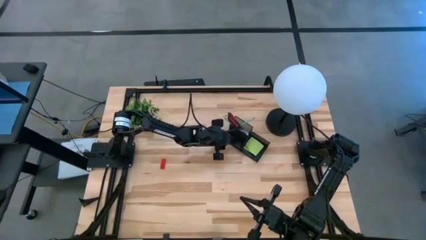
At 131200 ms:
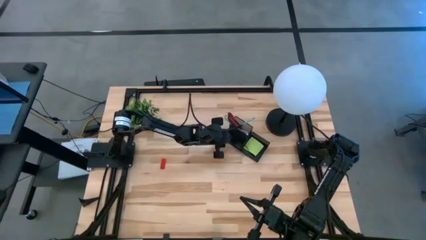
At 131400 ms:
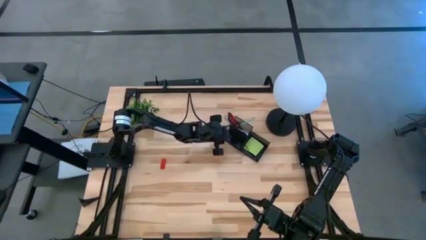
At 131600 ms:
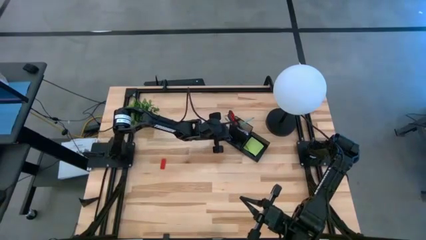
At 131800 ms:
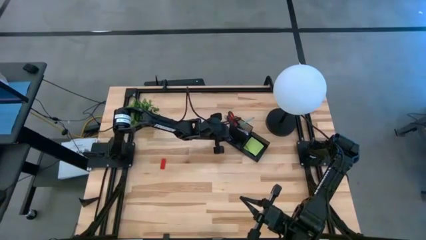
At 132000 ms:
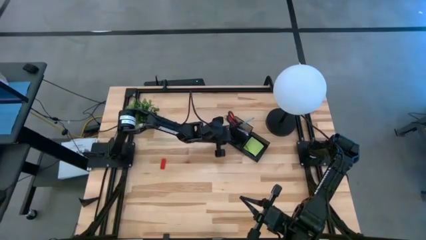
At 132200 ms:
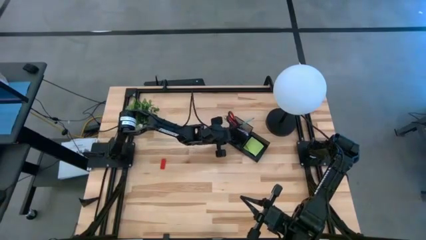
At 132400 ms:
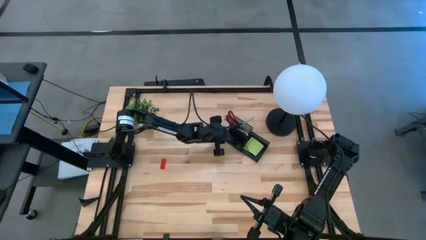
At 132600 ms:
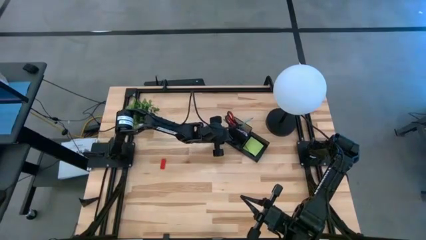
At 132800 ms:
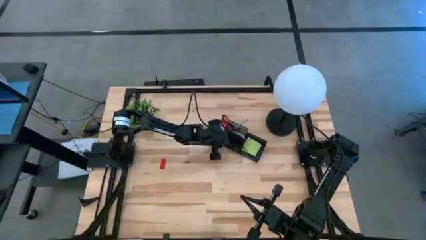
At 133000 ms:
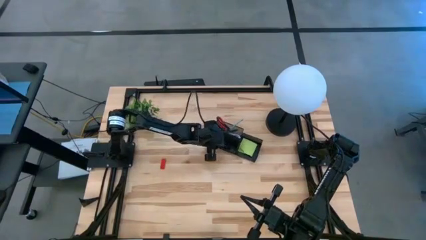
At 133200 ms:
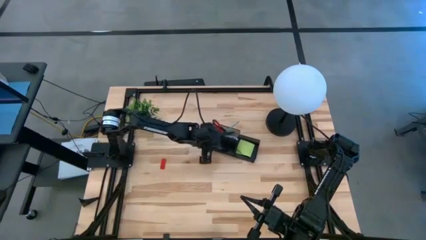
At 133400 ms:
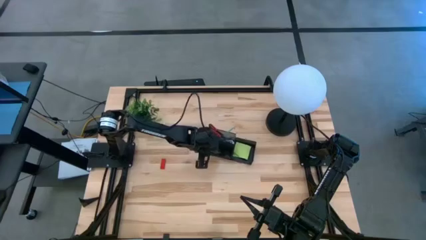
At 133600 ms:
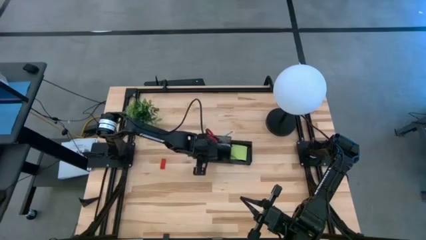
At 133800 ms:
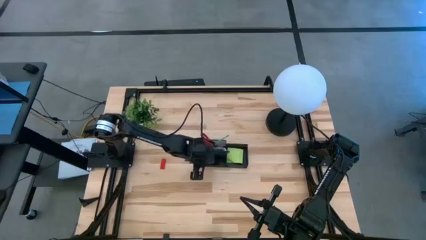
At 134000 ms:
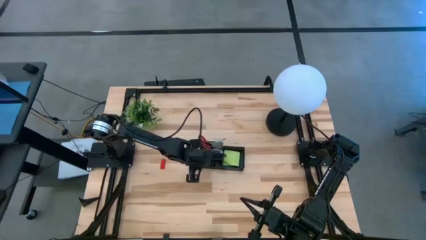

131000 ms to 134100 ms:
Task: Pick and place office supplies into organizer
Adjust the desk organizer

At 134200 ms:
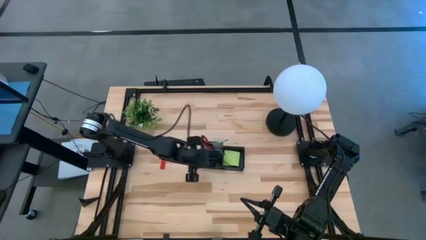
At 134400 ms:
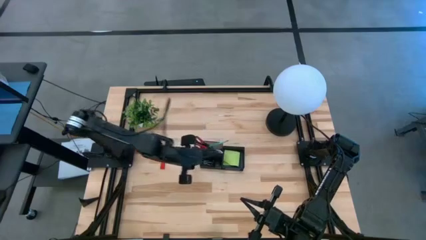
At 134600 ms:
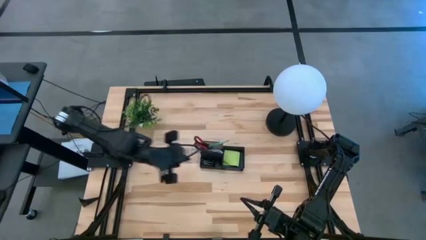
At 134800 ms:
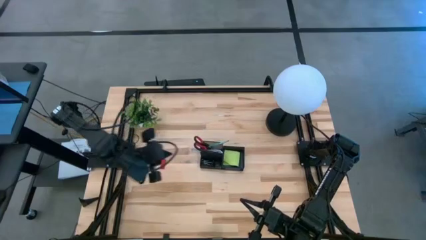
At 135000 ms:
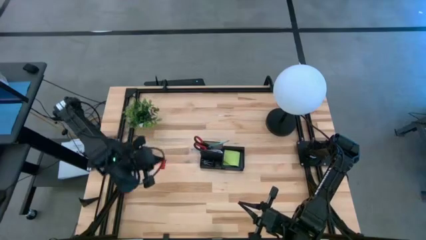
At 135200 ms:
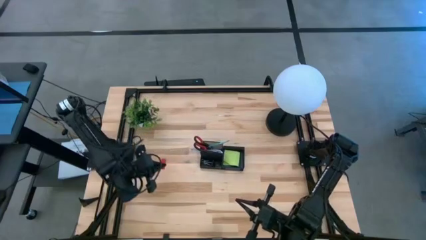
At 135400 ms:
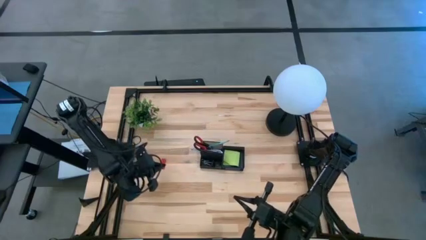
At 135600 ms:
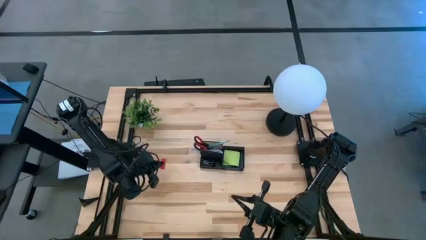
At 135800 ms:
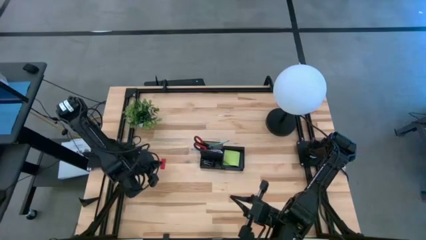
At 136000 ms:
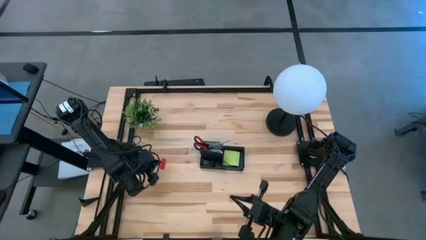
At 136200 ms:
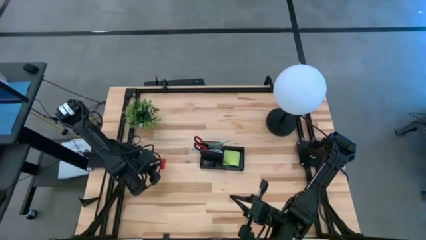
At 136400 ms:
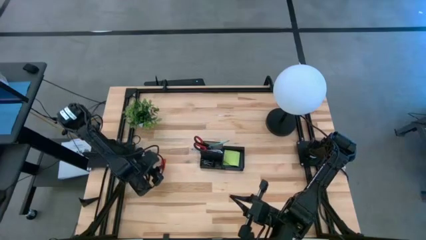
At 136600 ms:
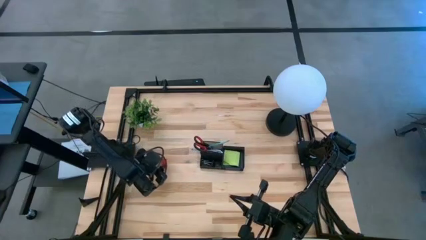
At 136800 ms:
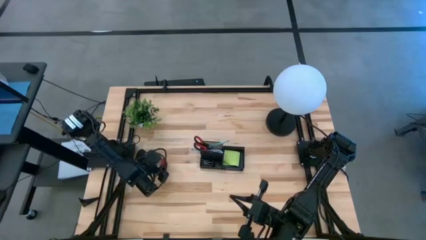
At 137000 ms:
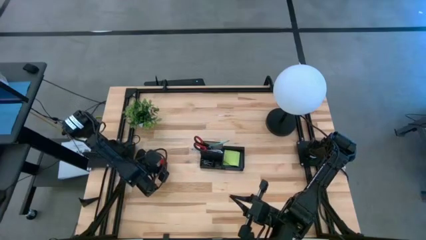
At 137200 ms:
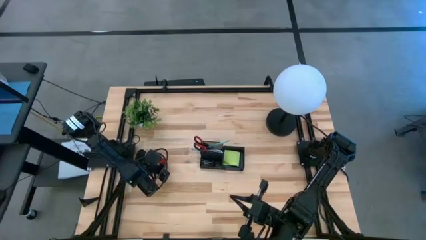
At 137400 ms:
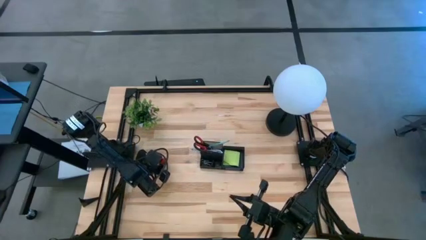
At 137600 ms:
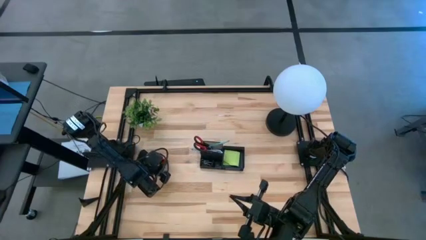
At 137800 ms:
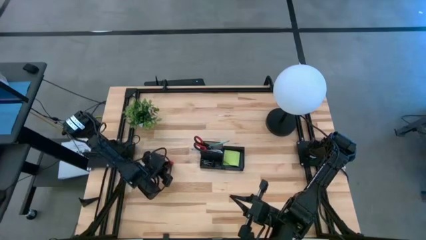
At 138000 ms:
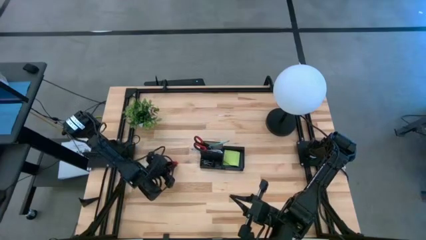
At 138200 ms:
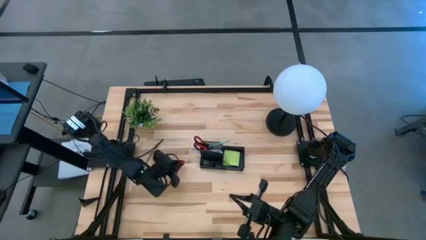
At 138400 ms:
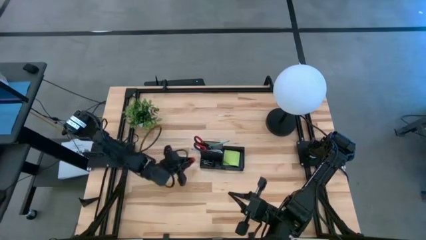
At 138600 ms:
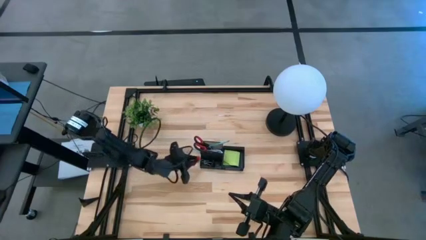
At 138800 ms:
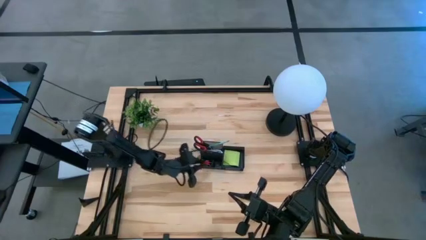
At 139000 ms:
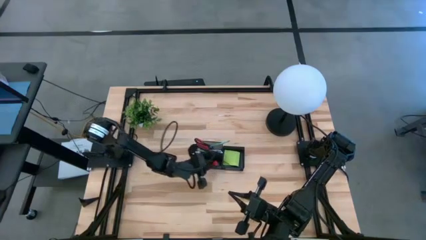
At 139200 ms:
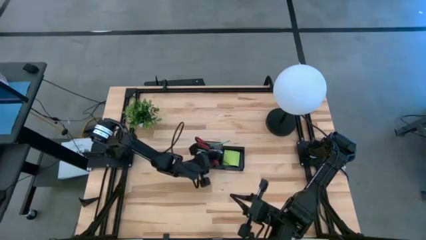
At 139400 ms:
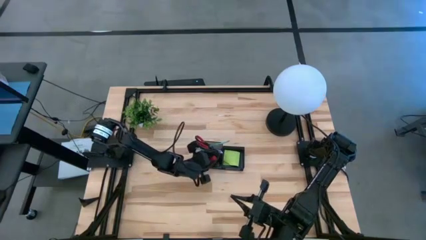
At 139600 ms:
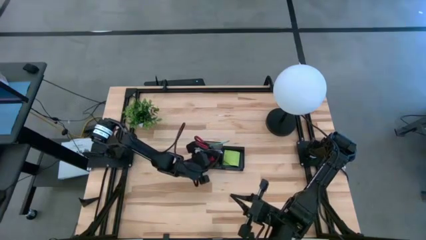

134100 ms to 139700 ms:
Put the red eraser into the desk organizer

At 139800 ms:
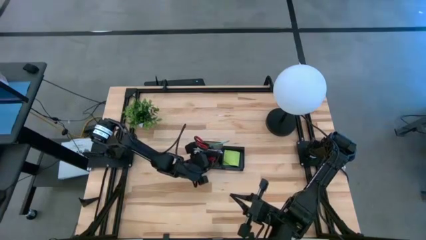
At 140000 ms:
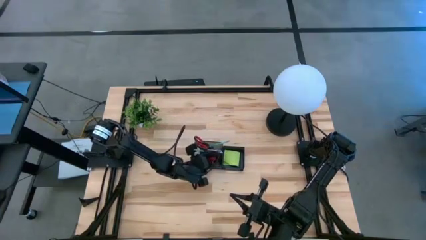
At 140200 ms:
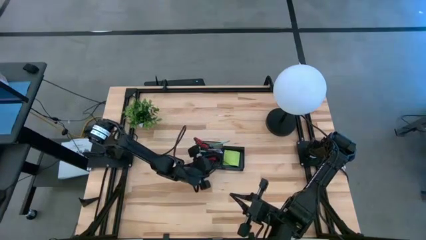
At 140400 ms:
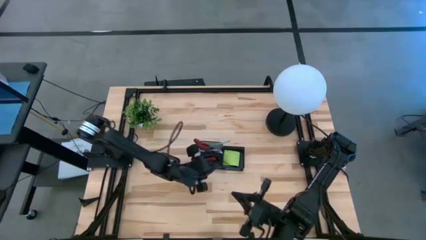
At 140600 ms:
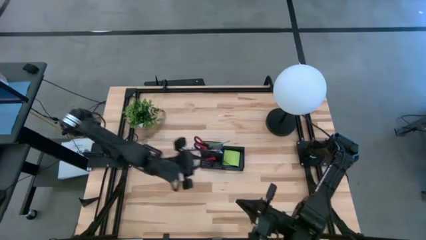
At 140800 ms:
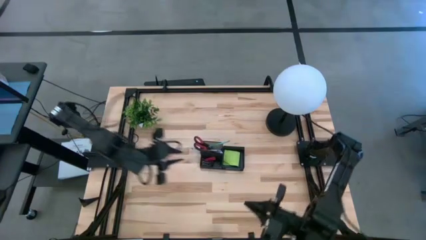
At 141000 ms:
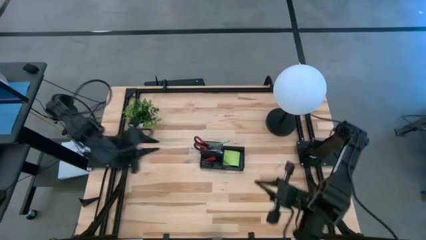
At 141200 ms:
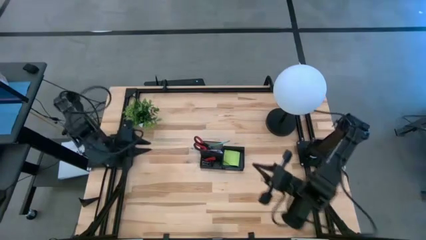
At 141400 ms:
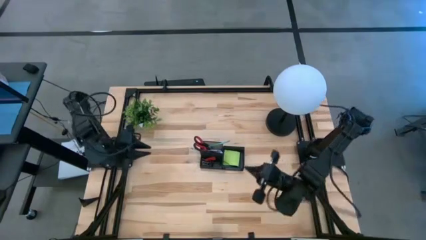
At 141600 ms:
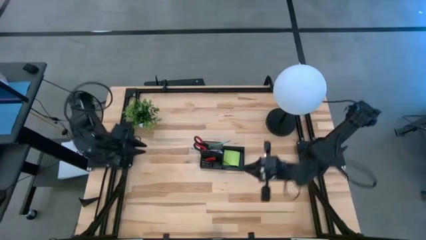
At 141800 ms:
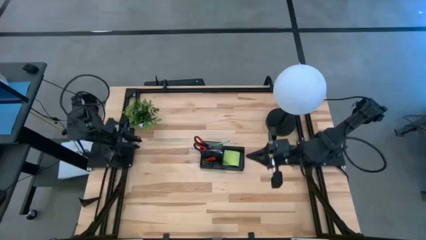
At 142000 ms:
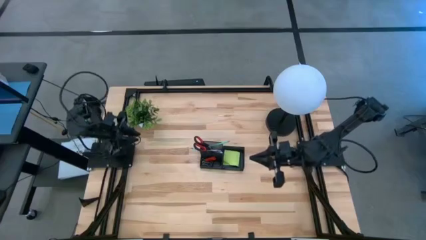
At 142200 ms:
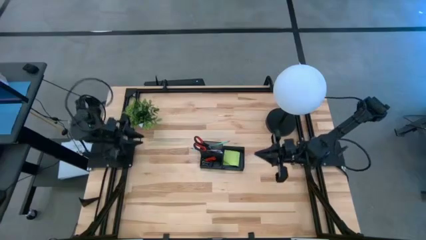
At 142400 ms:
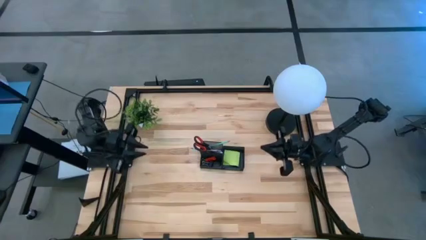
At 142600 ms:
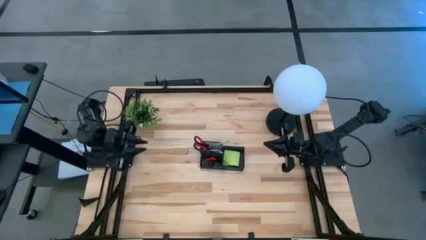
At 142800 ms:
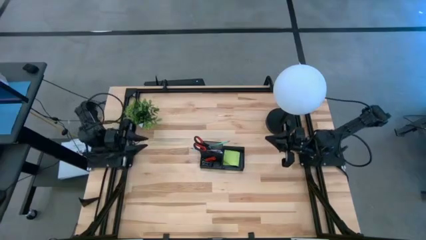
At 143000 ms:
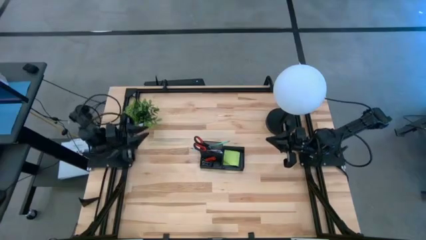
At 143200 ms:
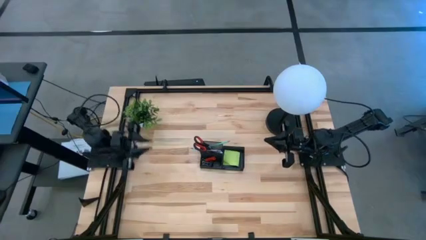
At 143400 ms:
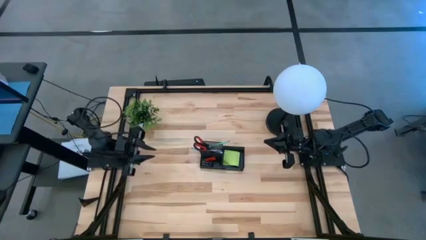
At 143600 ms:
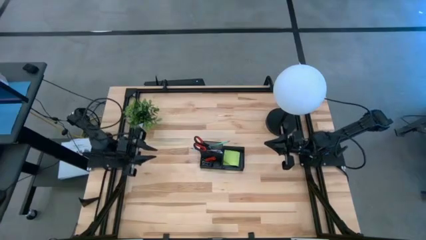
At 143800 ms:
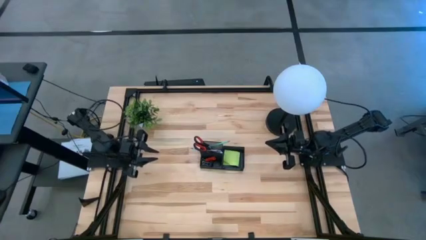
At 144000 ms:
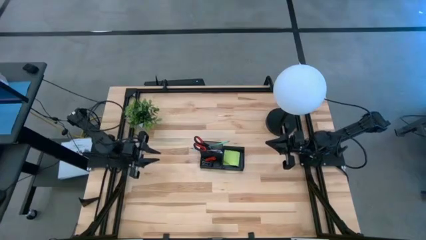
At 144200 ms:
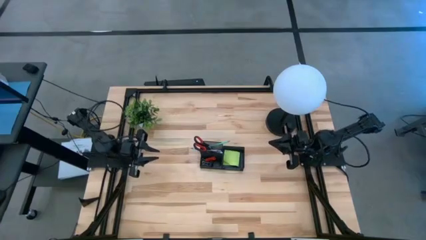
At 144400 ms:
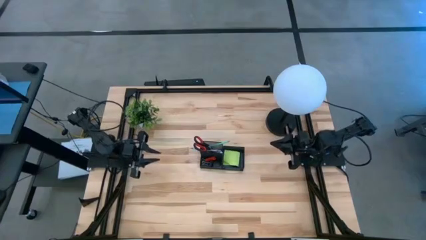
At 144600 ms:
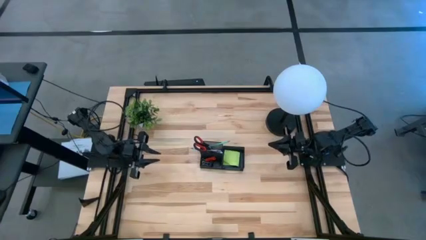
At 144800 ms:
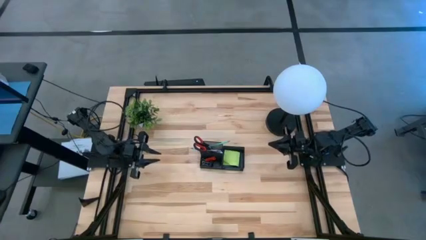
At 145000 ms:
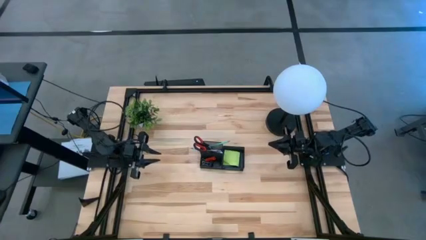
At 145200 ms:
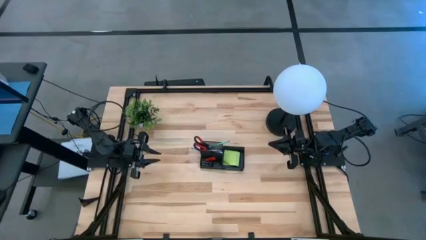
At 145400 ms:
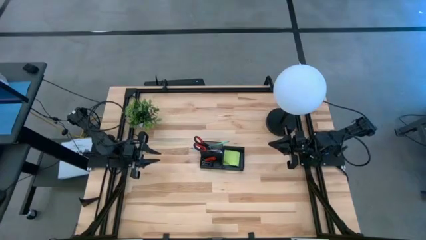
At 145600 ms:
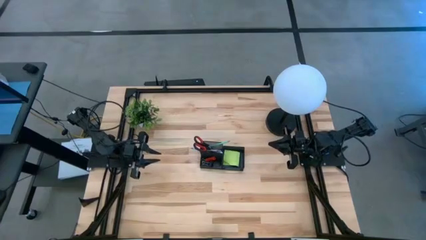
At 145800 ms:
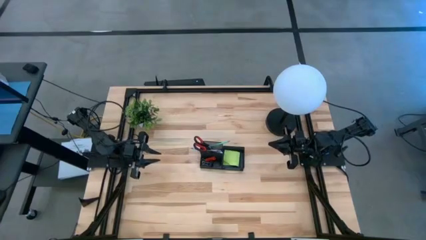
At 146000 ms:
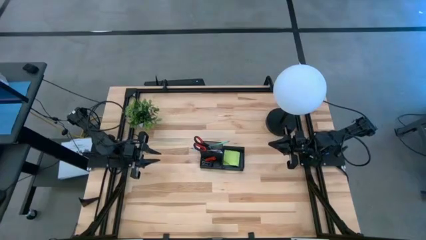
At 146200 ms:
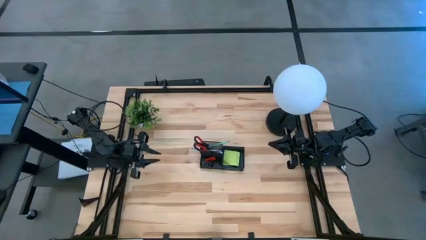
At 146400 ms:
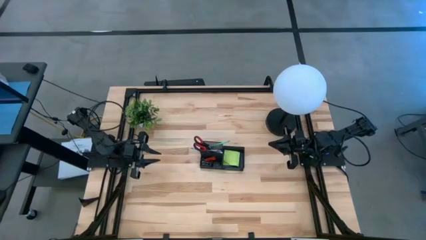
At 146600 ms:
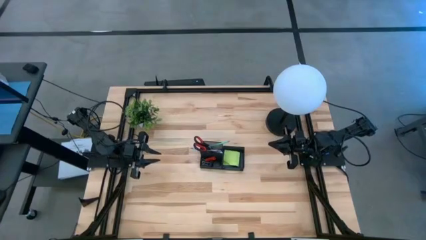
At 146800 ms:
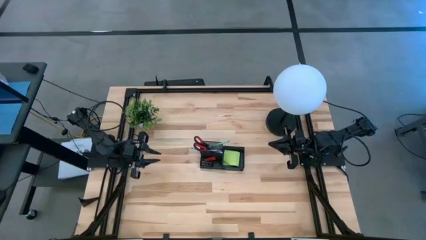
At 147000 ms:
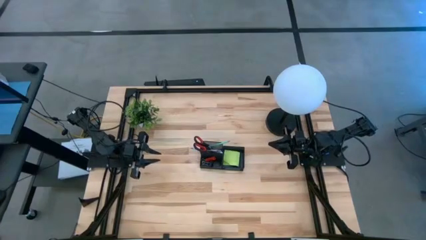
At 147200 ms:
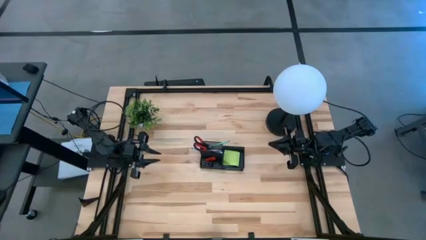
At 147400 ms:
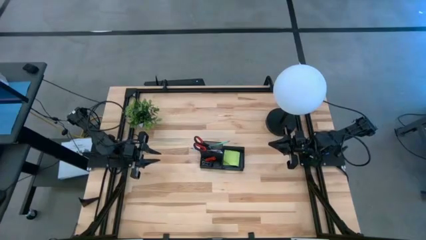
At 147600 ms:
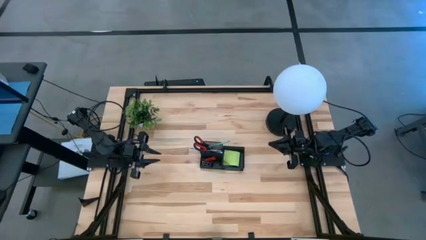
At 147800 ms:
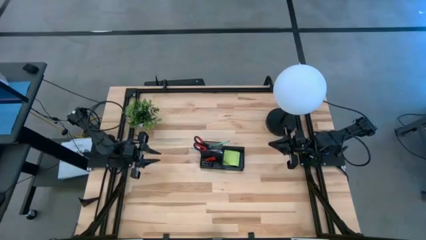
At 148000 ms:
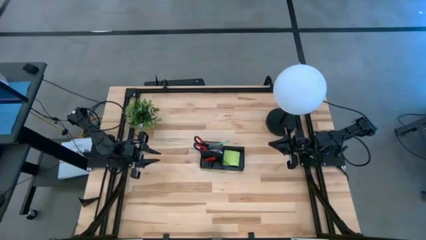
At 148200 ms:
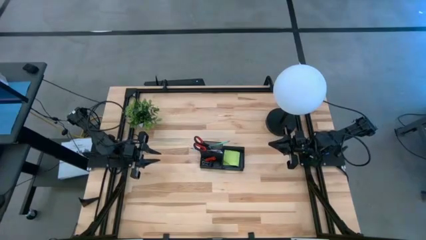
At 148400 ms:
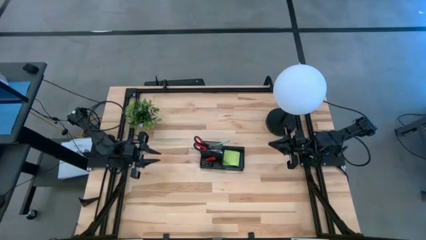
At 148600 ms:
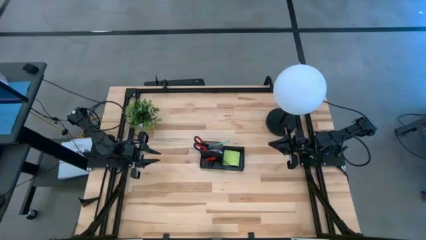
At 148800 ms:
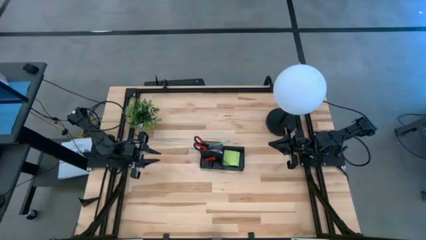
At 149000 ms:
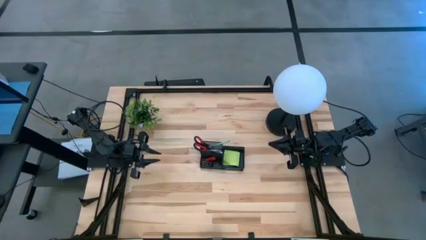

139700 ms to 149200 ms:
Return to Home Position
